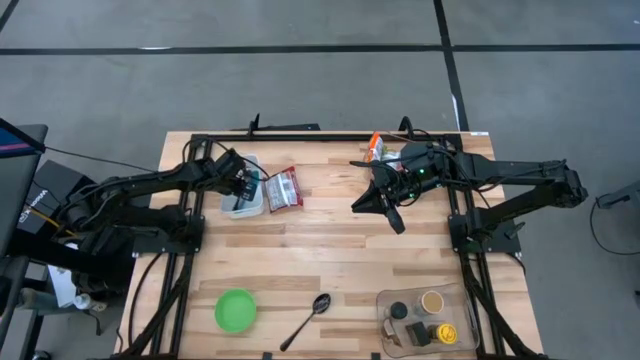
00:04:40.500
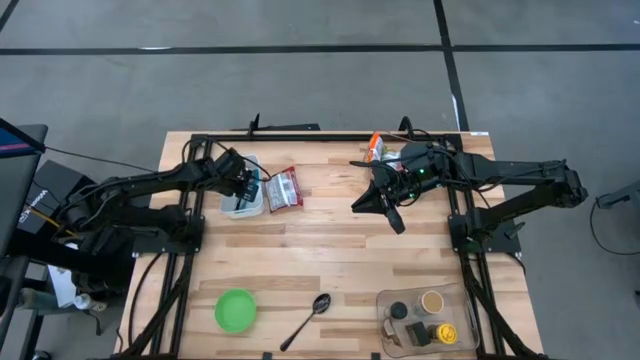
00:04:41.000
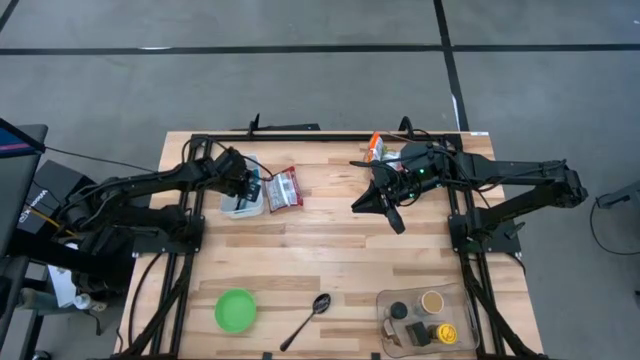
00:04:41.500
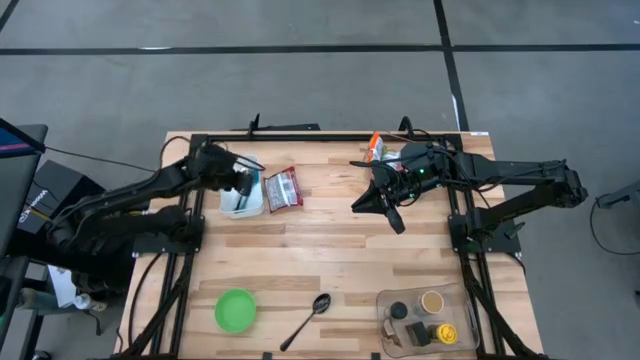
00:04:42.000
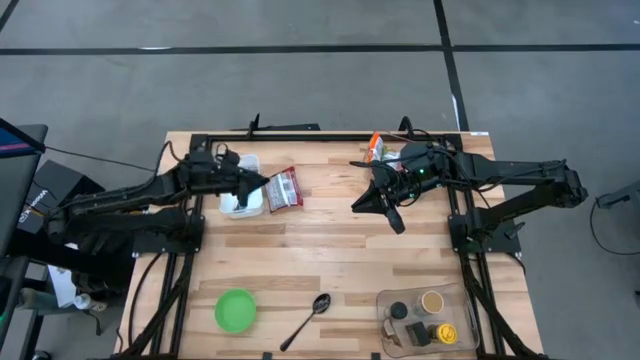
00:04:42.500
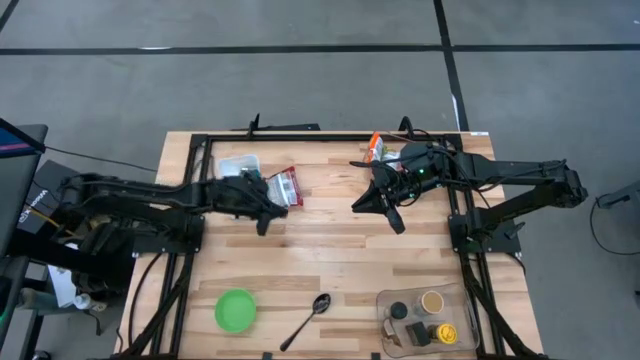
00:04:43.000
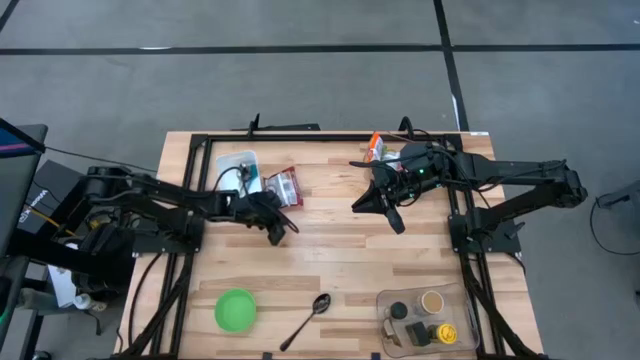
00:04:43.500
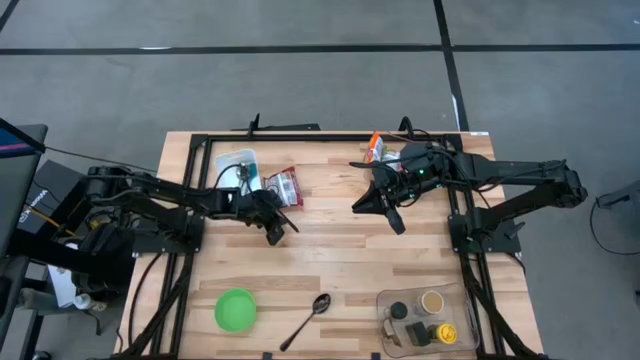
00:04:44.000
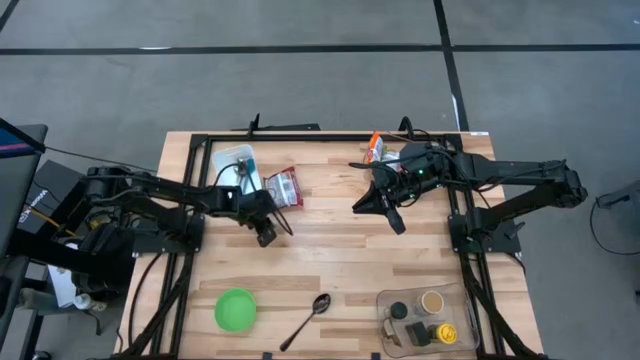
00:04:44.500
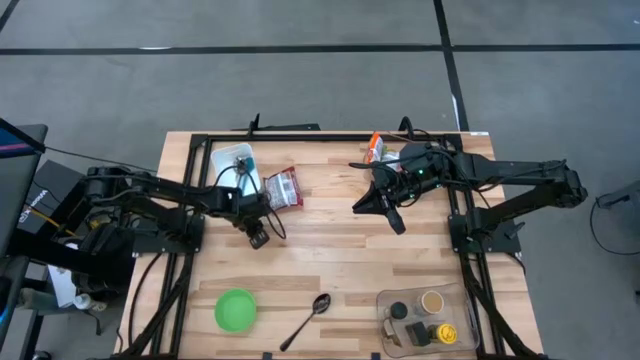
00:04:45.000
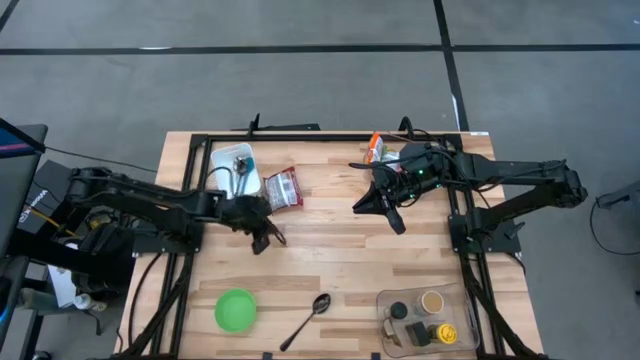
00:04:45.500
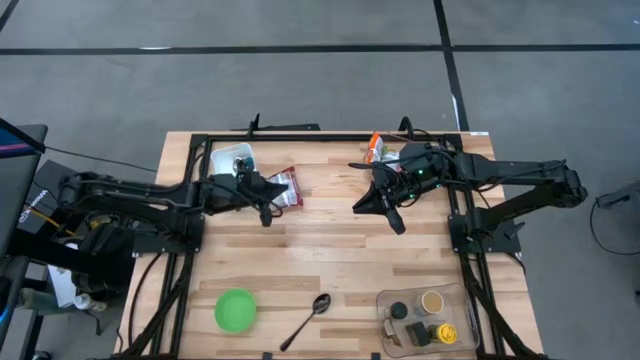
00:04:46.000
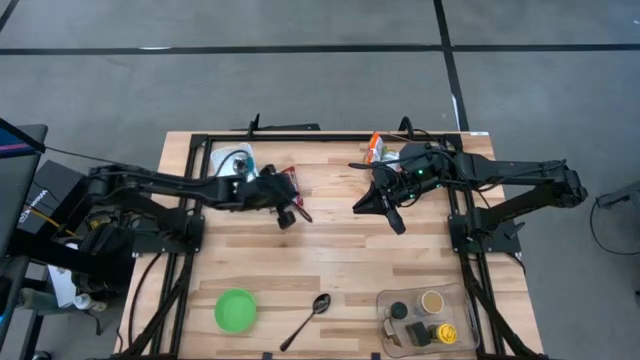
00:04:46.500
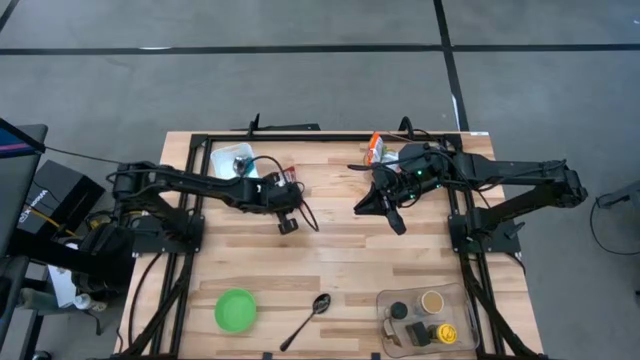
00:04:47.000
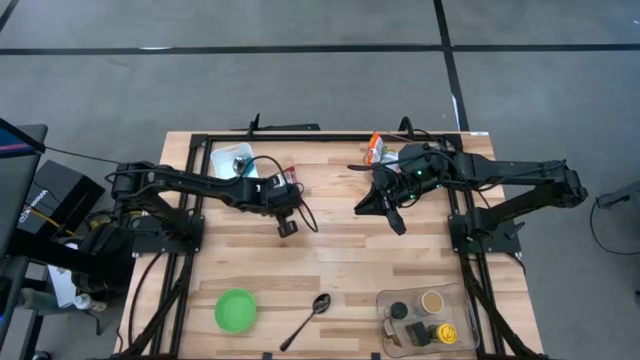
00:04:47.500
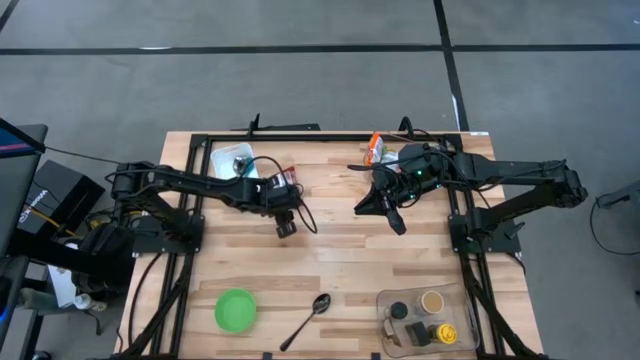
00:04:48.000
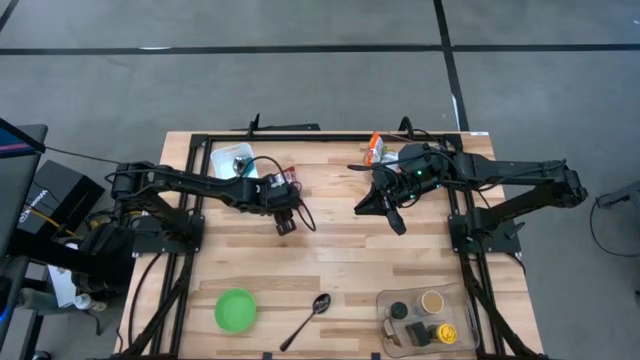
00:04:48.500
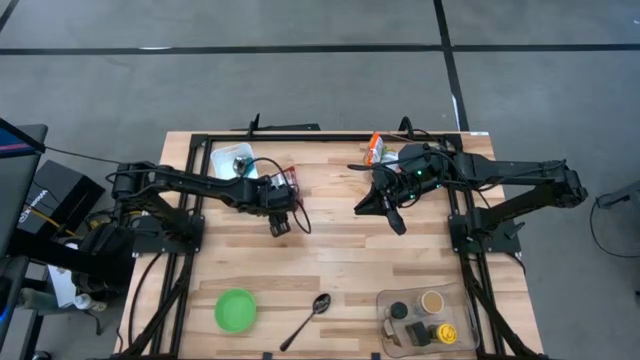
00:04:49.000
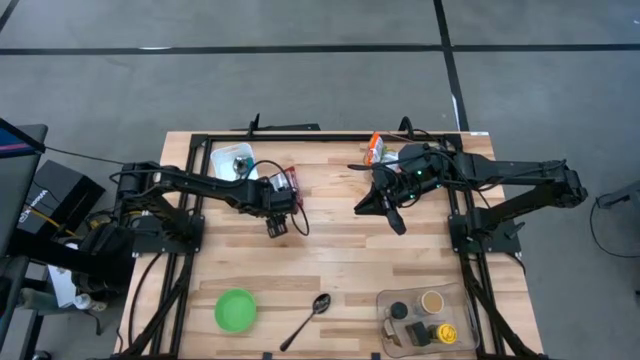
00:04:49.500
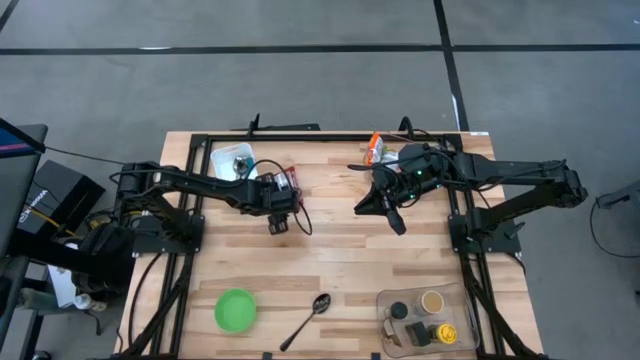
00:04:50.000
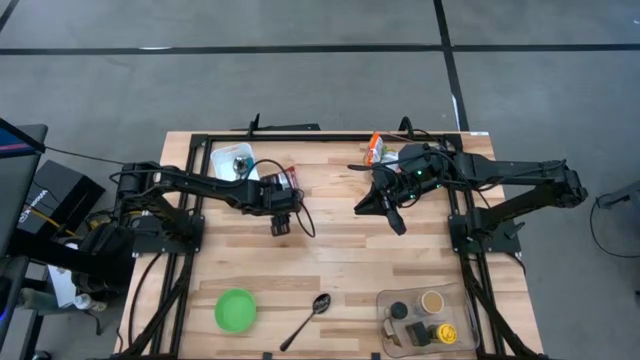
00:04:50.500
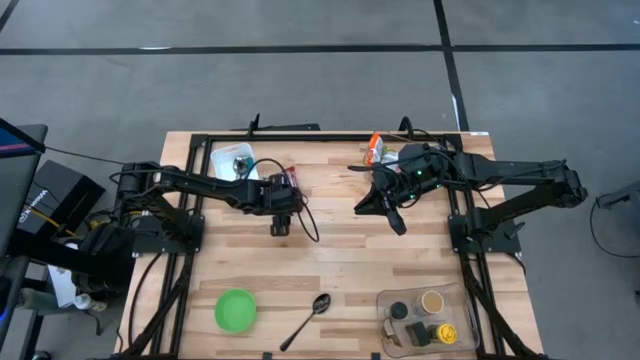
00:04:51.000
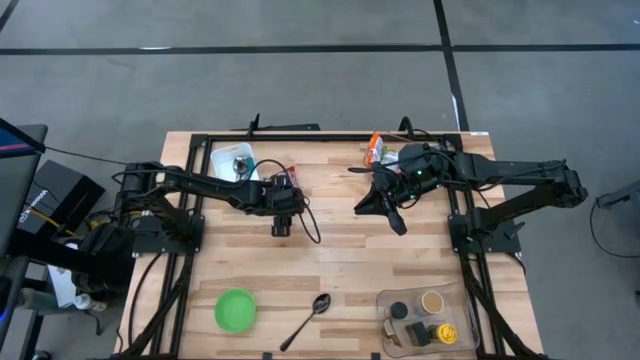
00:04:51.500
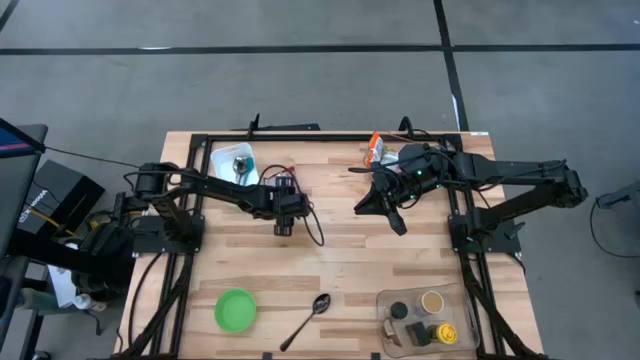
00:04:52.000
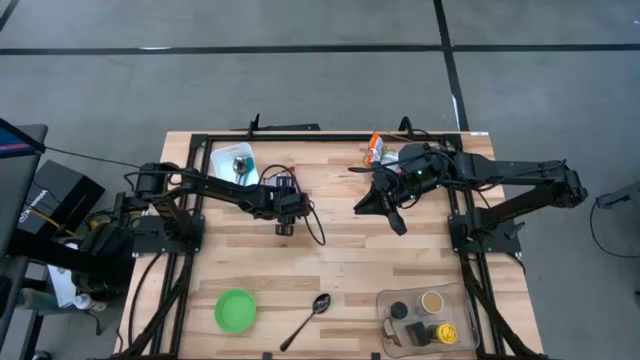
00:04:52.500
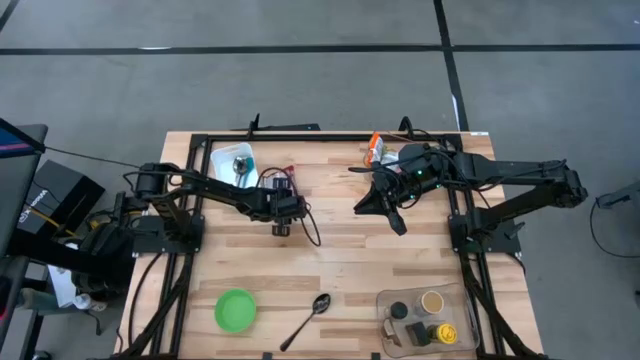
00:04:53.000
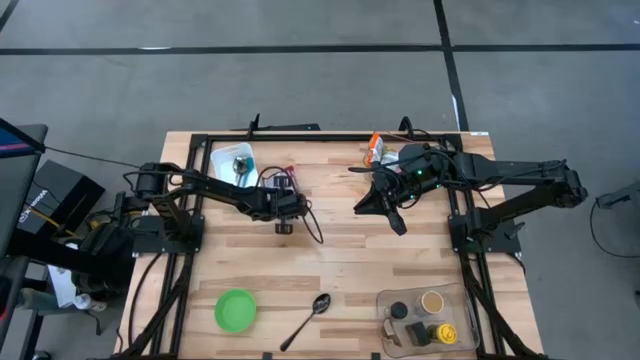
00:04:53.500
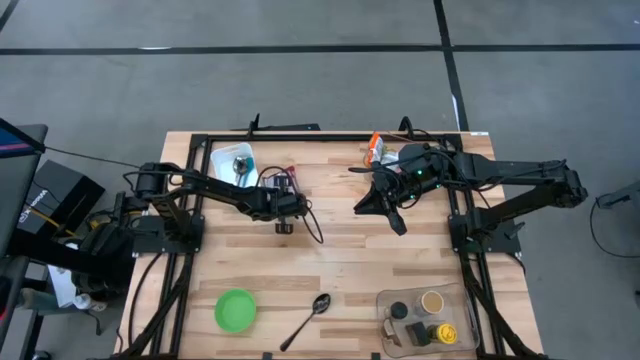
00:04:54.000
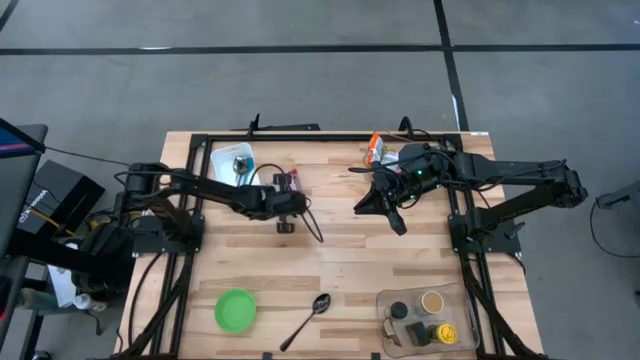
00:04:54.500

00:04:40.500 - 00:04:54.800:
Task: Pick & Place Food Item
Put the red noodle pack into the top transparent bin

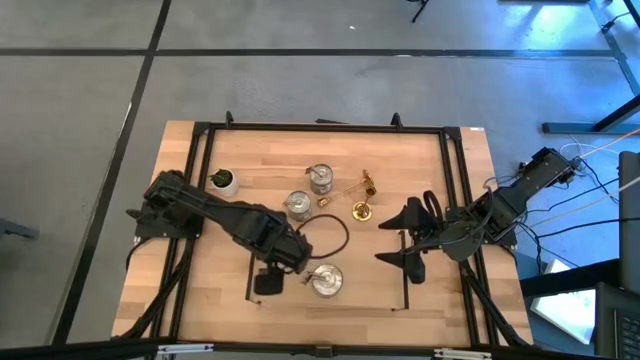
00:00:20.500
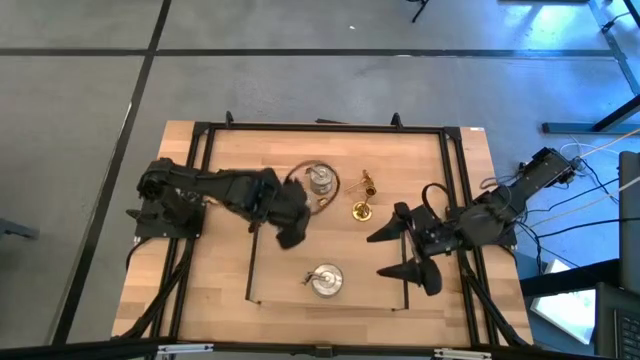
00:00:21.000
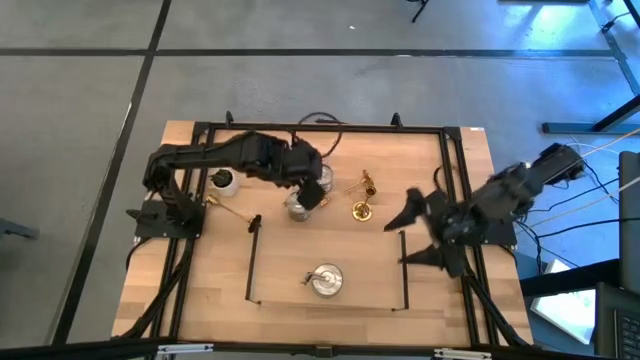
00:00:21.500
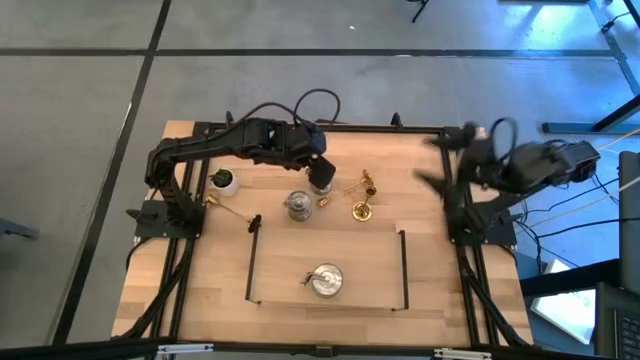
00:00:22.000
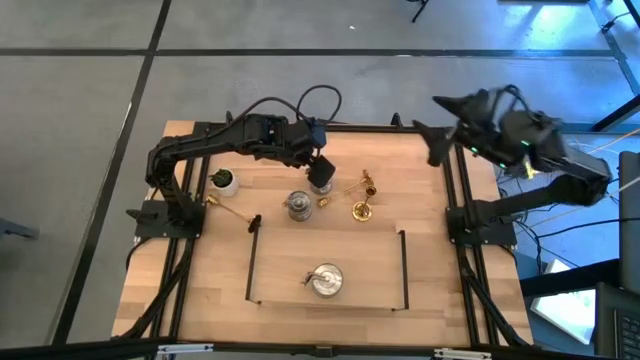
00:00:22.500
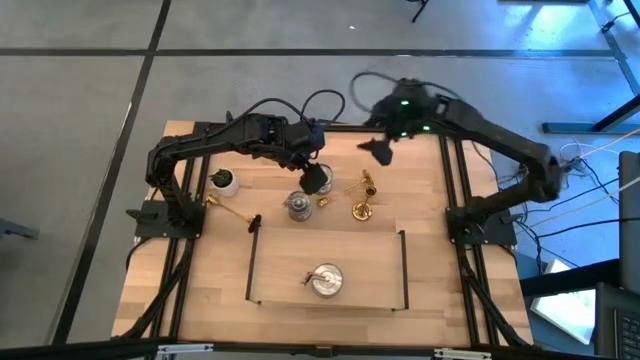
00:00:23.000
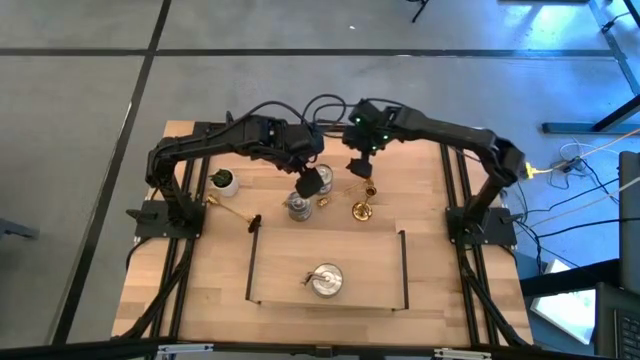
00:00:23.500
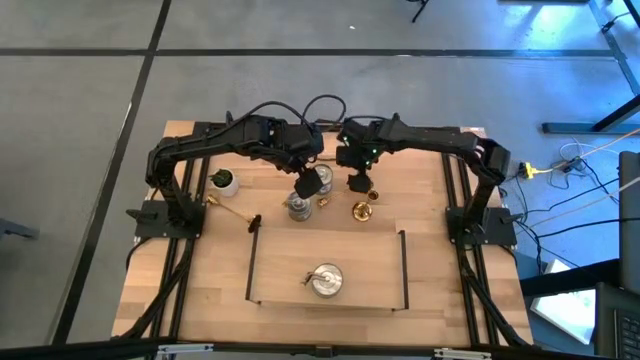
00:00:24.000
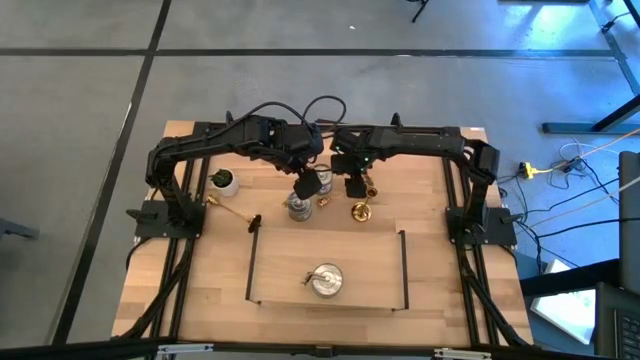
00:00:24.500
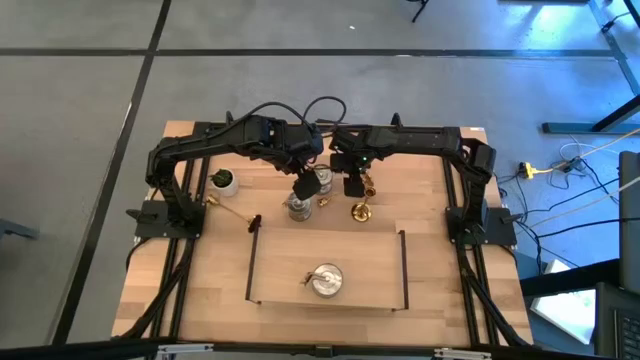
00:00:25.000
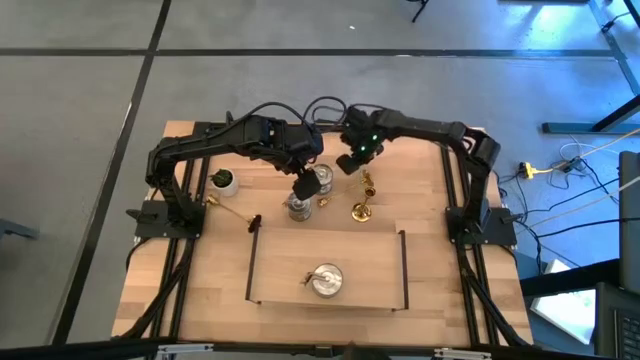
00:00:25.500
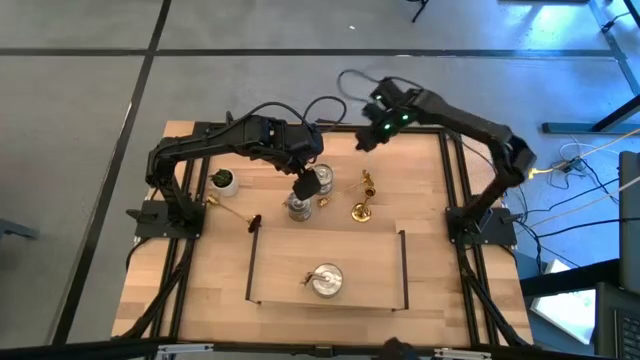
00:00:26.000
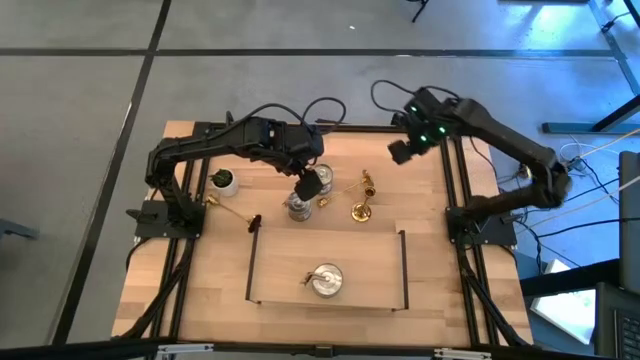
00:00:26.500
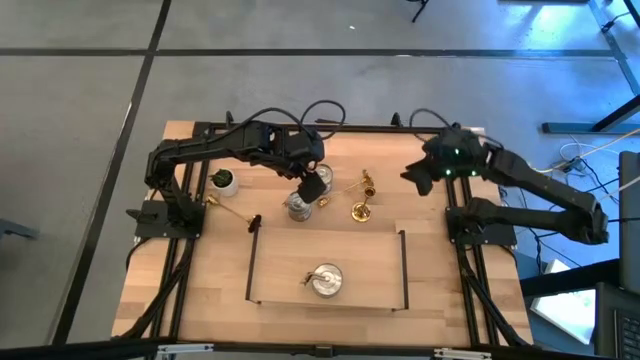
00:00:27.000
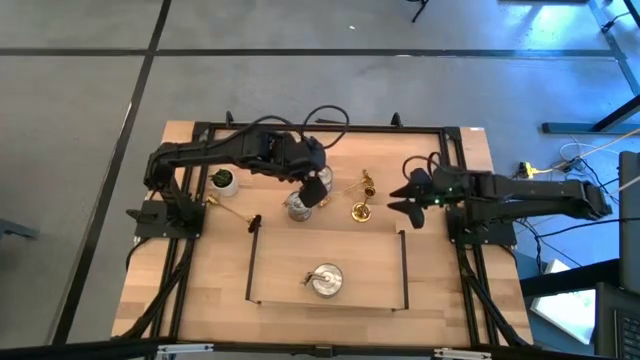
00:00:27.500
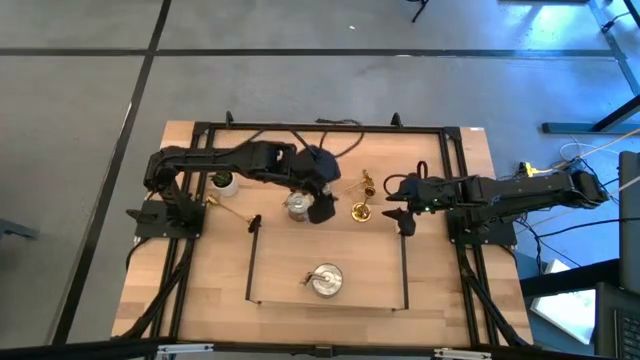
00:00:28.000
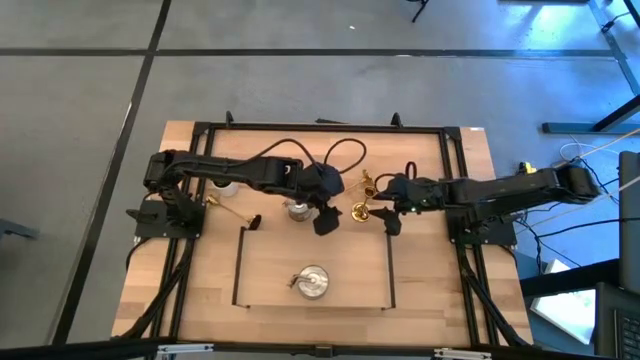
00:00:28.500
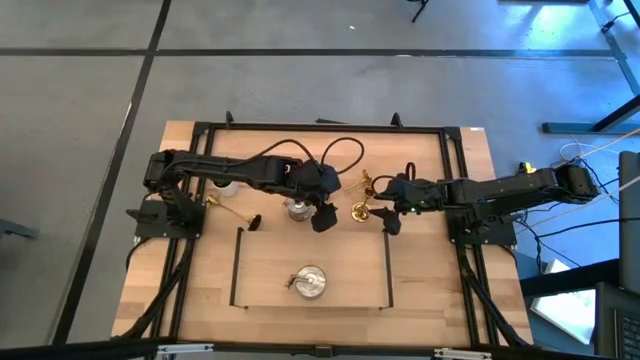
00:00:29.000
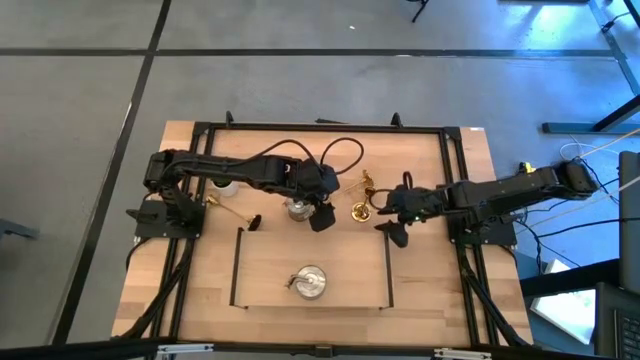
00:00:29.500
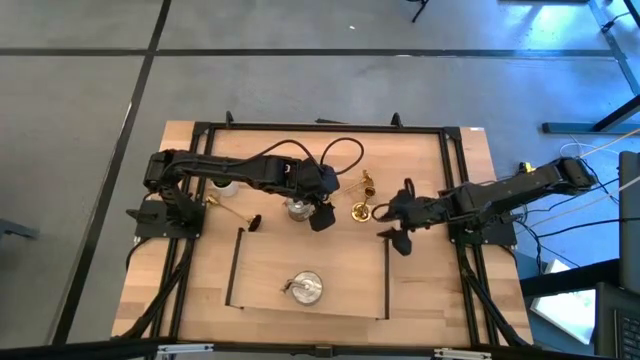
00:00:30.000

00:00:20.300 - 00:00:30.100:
Task: Pick & Place candle stick holders
Adjust the shelf
